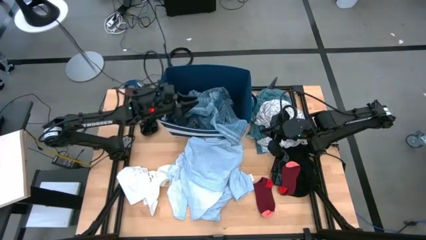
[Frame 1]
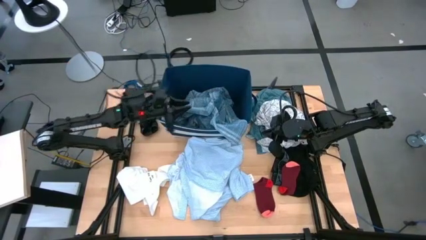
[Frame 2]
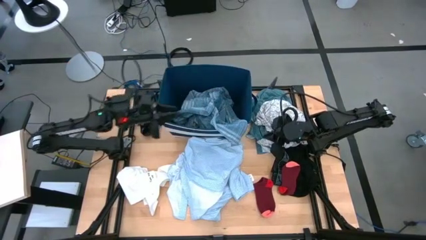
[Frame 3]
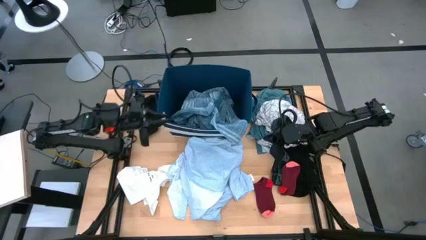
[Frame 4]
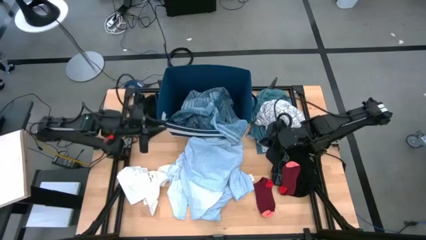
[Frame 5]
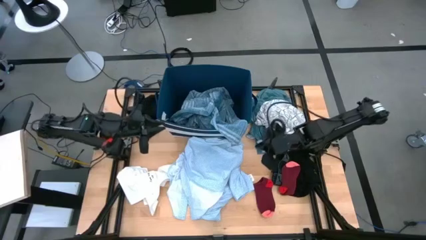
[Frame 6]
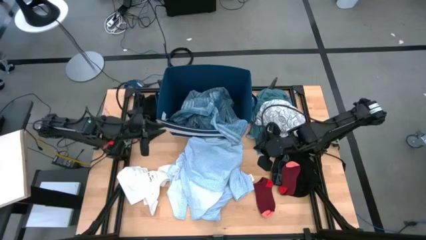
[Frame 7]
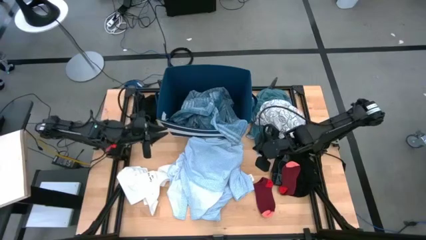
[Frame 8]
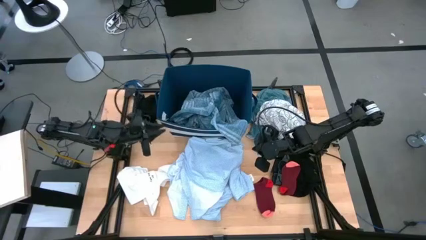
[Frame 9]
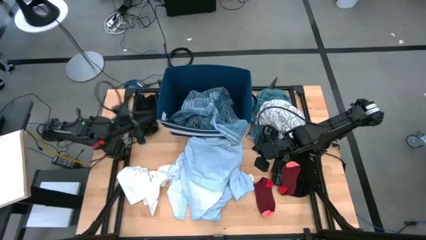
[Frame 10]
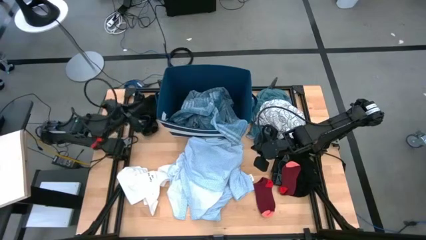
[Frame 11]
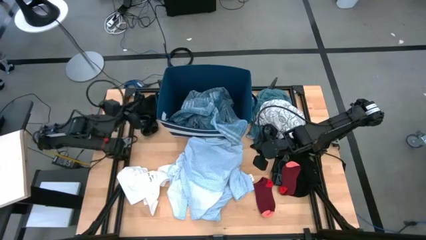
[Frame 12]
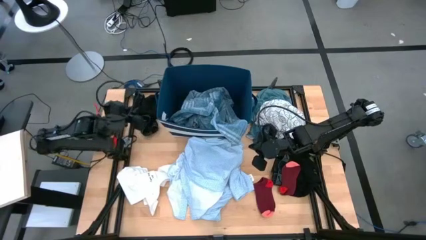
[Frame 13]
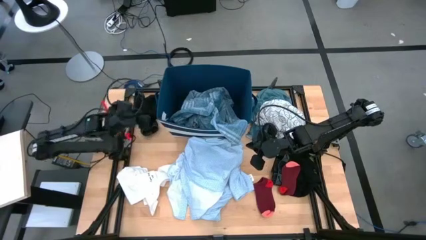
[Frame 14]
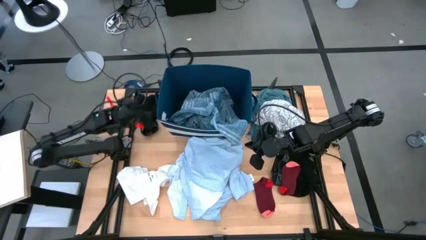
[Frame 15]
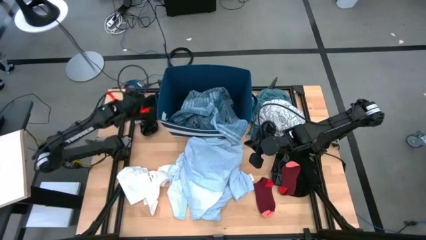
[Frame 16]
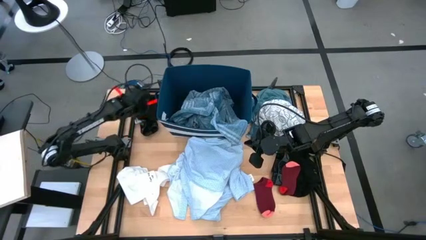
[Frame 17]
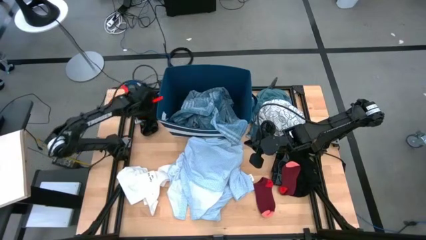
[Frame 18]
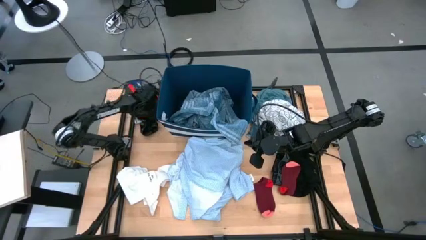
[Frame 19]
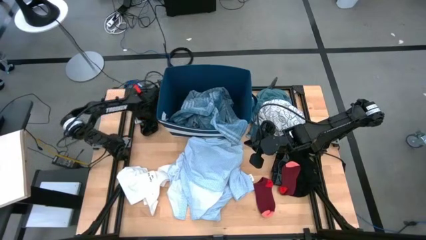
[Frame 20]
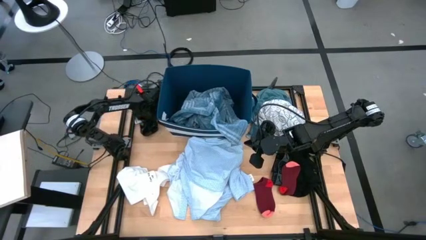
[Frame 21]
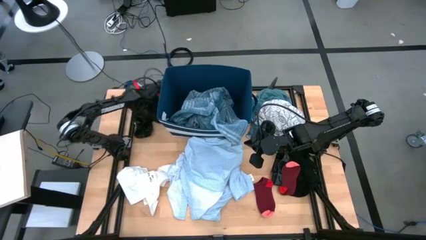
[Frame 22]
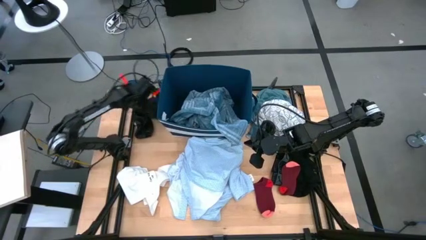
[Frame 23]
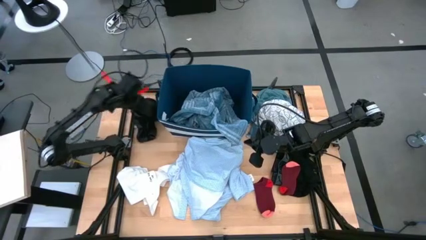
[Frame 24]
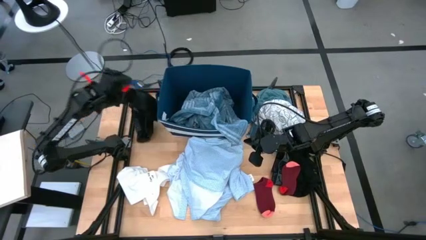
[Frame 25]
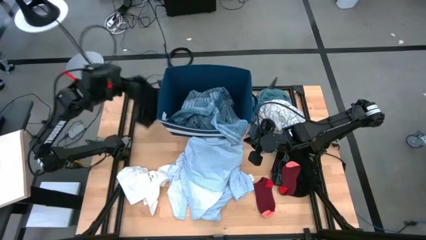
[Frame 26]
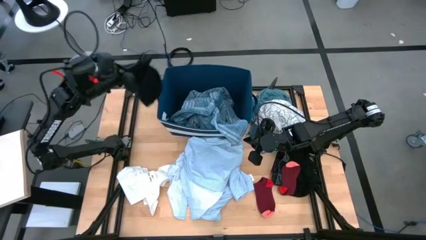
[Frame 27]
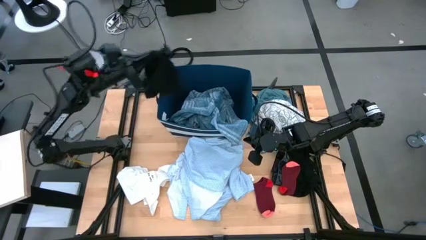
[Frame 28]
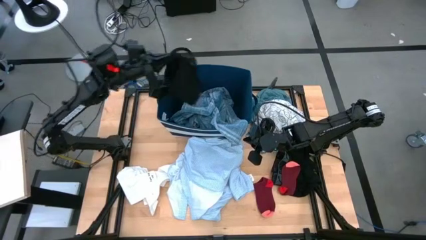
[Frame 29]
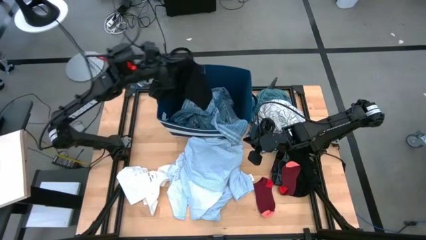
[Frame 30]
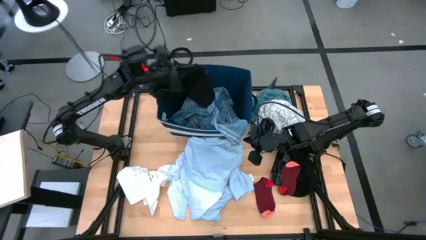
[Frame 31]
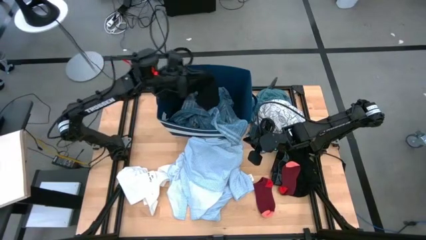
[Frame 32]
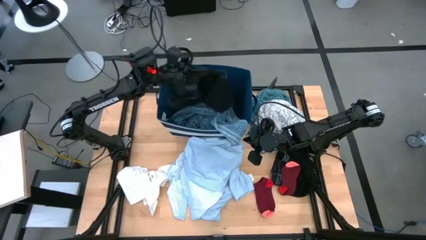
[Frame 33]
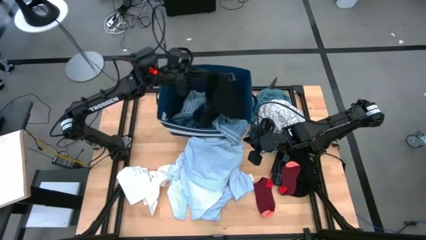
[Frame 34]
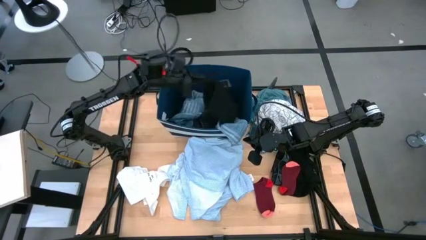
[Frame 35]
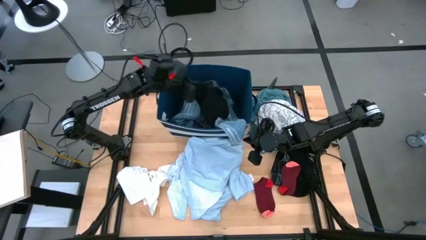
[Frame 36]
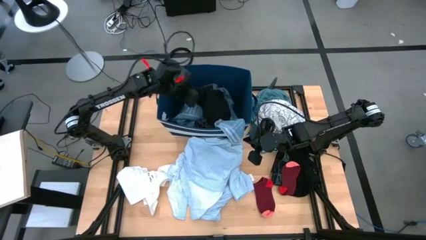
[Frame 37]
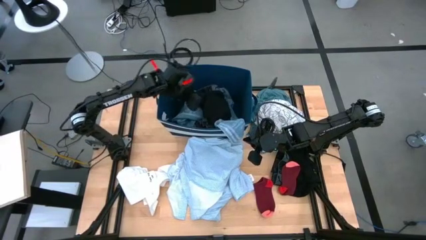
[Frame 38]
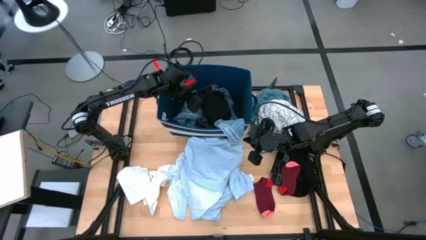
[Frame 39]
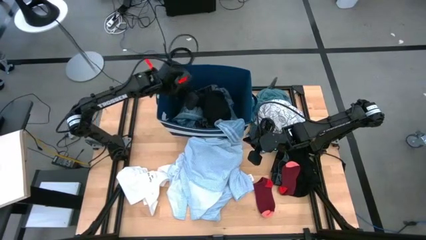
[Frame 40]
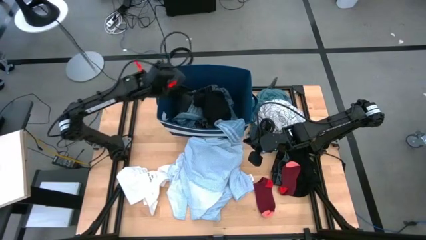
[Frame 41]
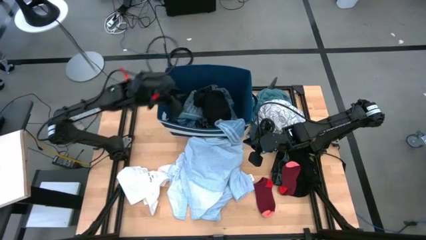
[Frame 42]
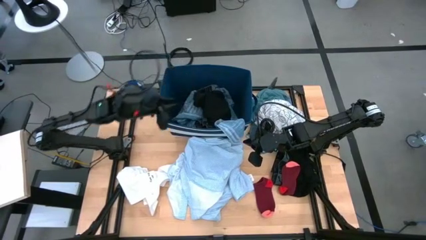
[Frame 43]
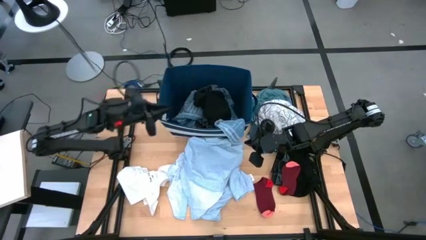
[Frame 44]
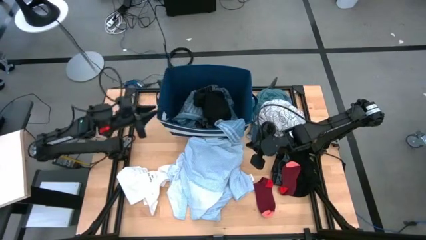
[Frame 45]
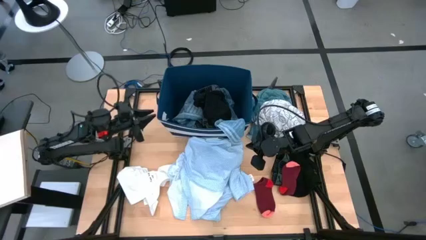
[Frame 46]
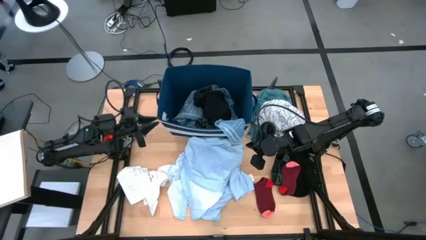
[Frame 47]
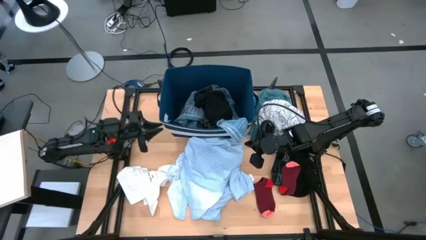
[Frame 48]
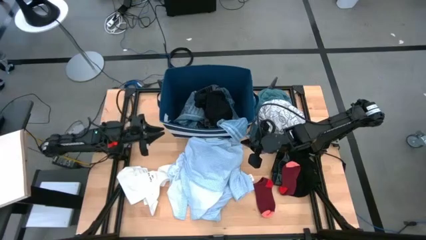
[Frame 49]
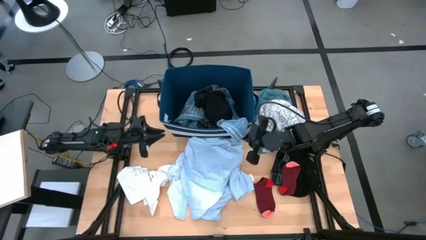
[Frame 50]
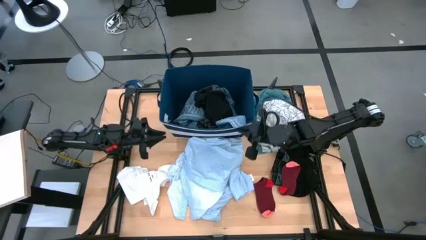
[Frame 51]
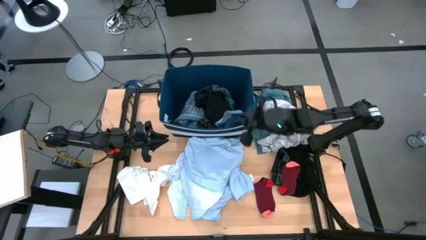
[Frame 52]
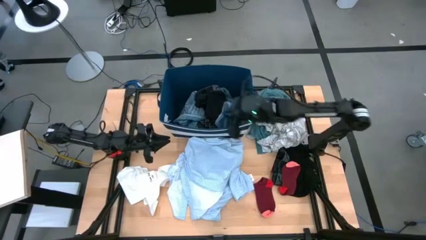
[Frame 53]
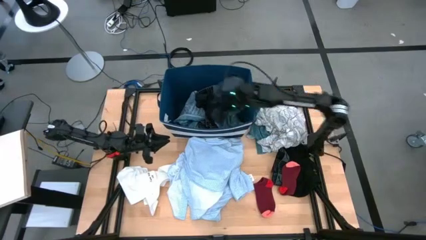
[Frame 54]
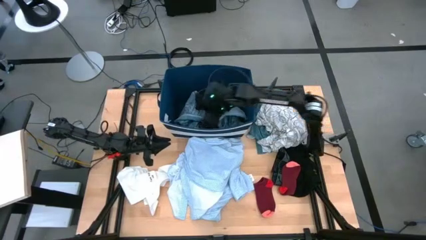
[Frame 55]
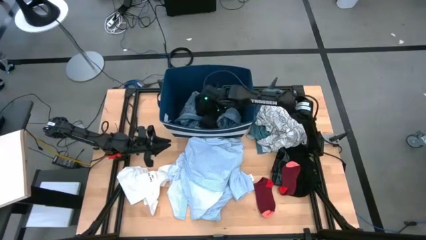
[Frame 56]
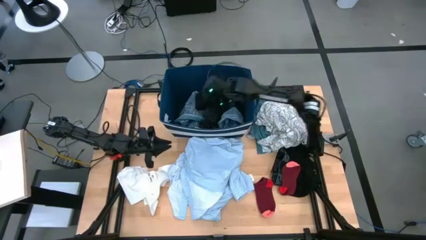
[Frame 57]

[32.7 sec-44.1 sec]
Task: Sort clothes
Put the top black underwear into the bin

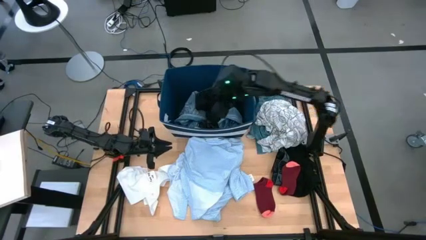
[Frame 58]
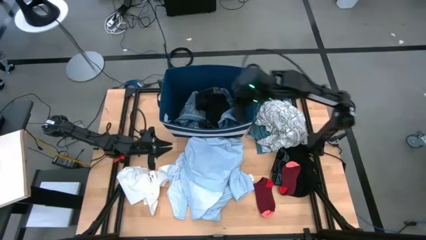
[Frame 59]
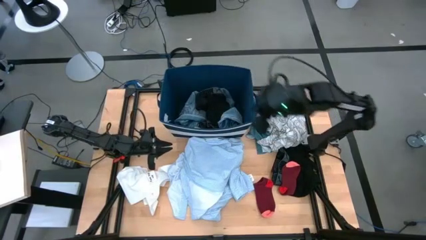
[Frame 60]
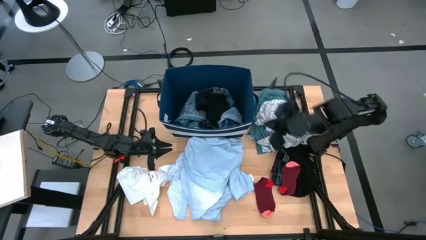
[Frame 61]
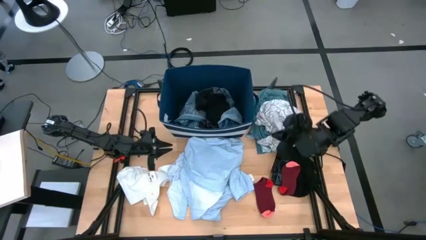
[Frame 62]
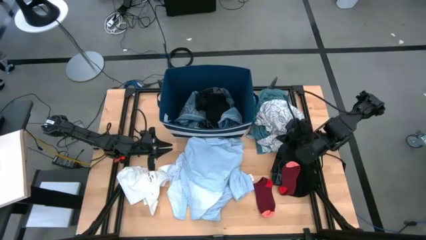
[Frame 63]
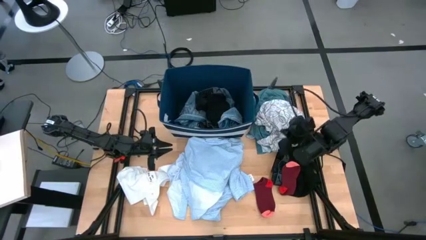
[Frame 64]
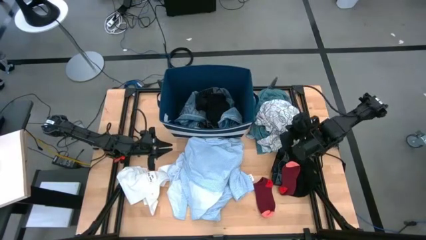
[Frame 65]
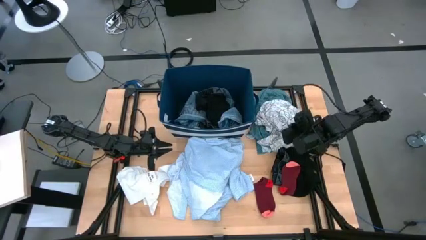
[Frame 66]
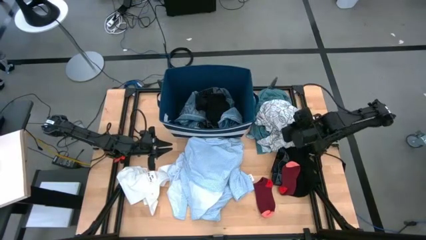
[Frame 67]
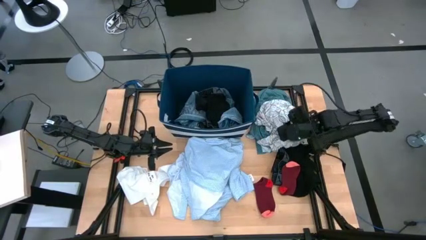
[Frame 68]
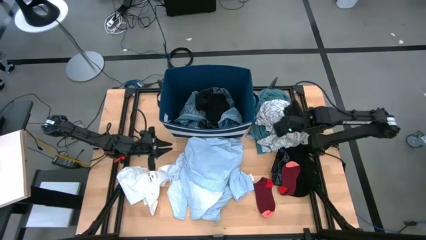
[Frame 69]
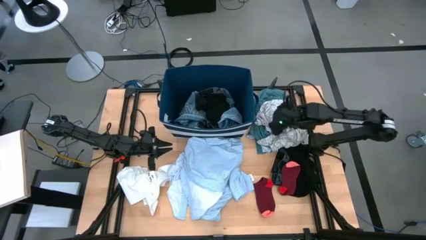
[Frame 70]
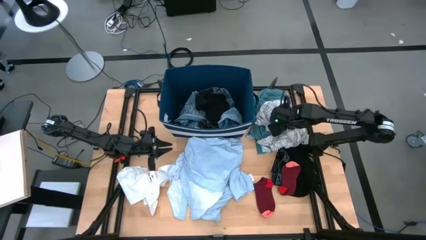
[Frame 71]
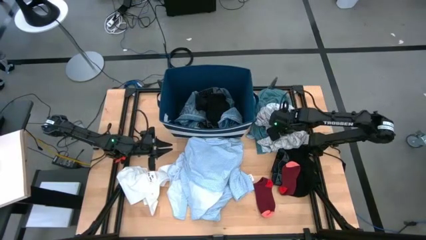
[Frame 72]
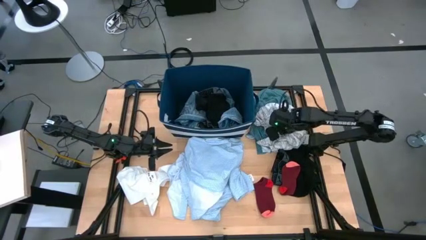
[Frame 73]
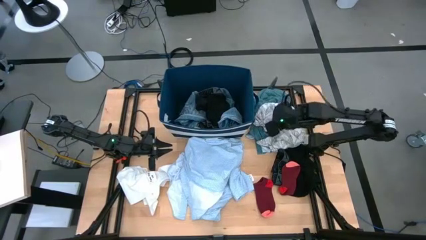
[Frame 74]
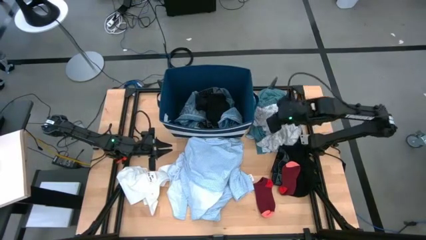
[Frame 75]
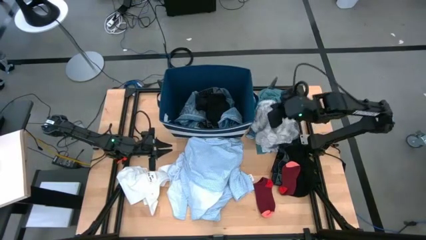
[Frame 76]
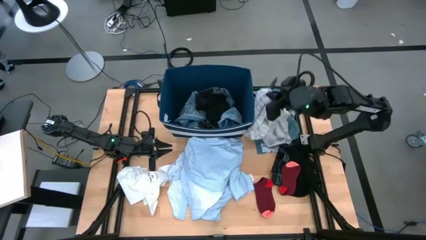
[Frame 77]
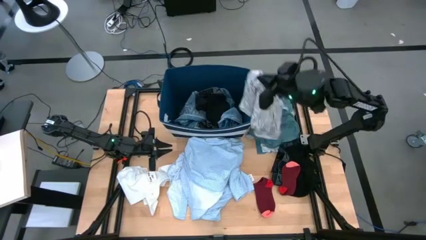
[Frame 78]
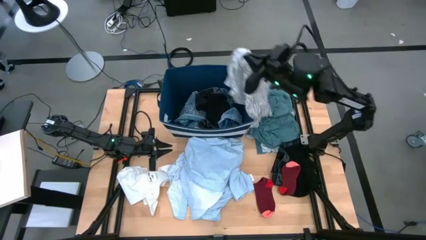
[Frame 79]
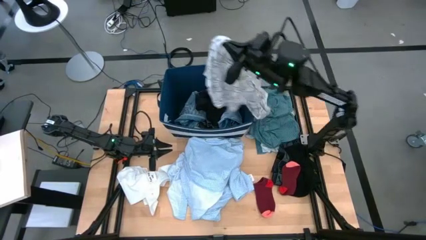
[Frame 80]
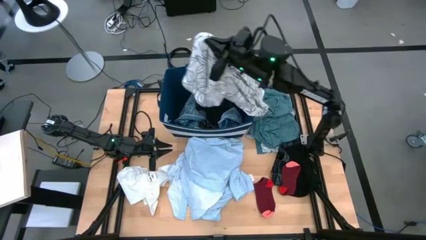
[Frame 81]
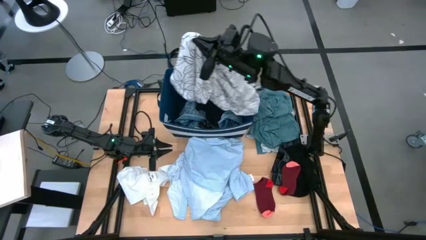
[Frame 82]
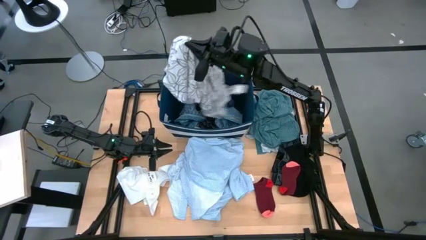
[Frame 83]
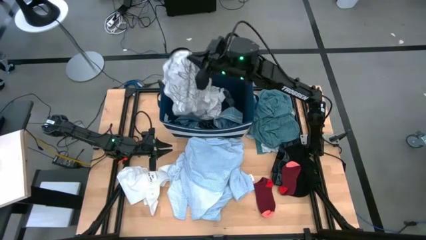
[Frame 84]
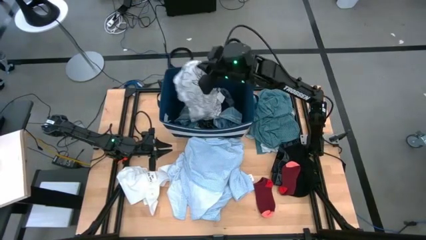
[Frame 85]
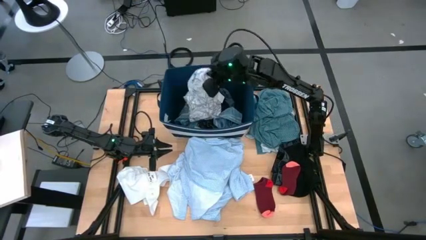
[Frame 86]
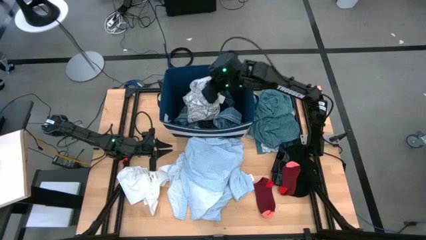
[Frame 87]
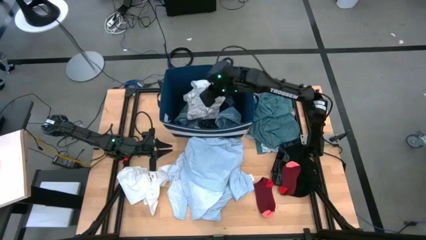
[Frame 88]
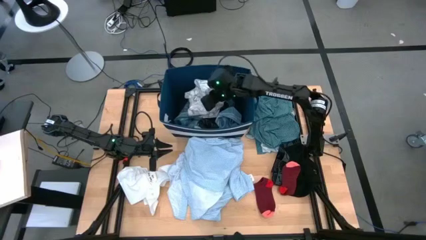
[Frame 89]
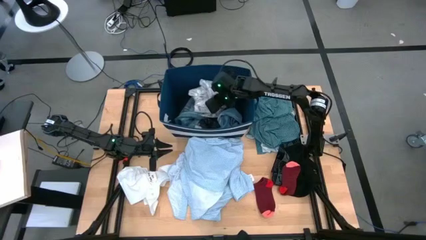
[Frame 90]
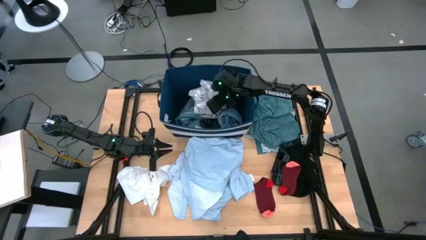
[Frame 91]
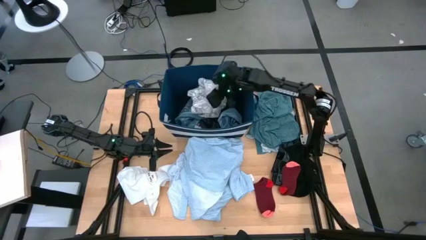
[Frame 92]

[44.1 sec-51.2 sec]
Put the white patterned shirt into the bin
